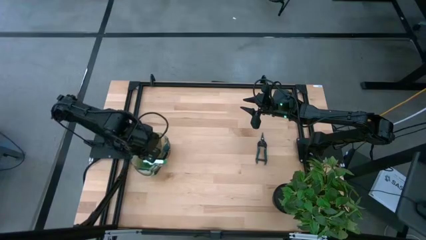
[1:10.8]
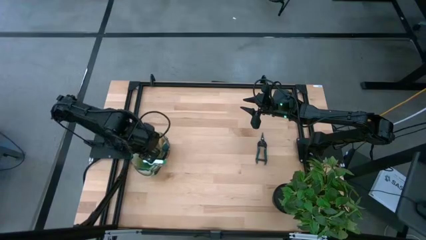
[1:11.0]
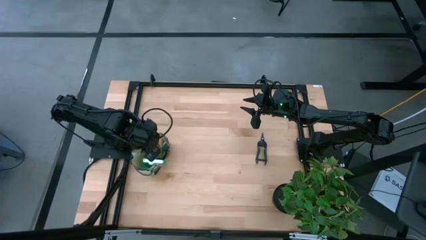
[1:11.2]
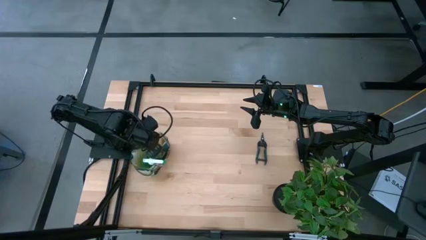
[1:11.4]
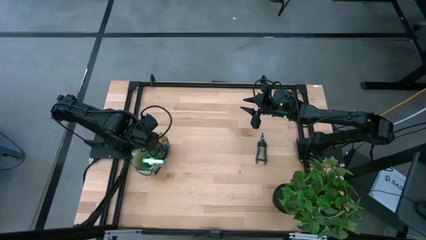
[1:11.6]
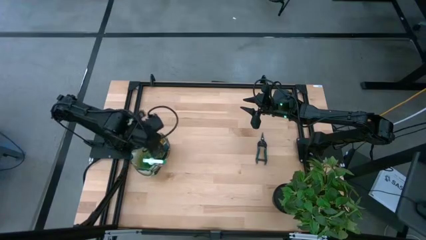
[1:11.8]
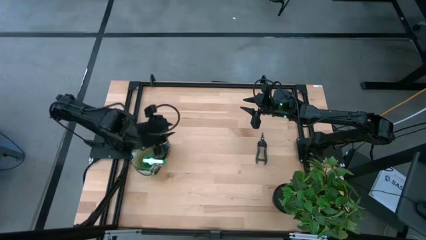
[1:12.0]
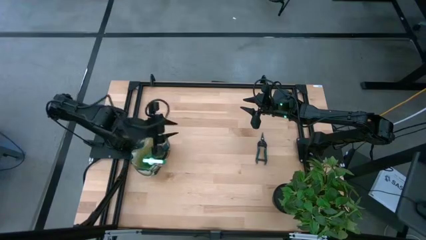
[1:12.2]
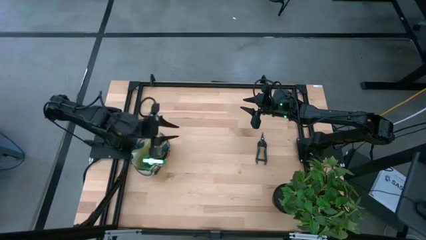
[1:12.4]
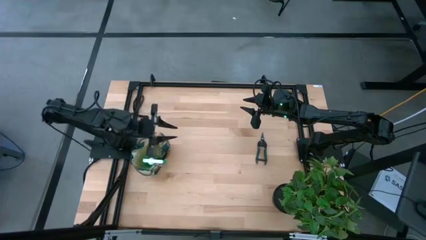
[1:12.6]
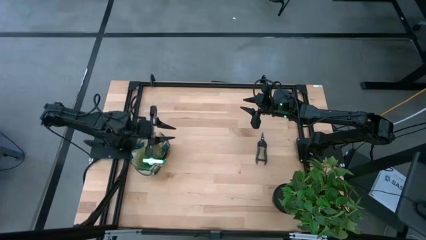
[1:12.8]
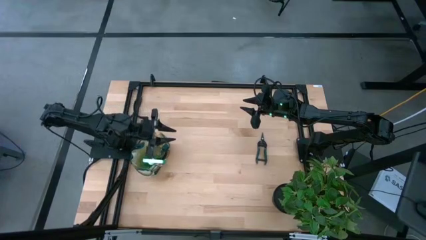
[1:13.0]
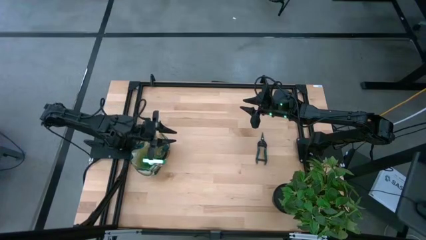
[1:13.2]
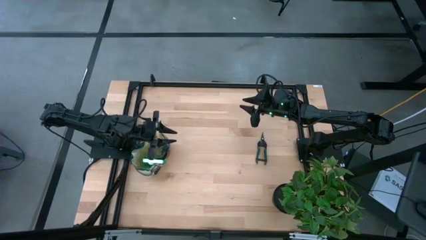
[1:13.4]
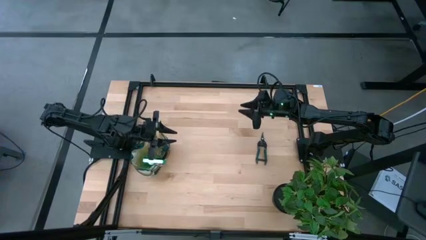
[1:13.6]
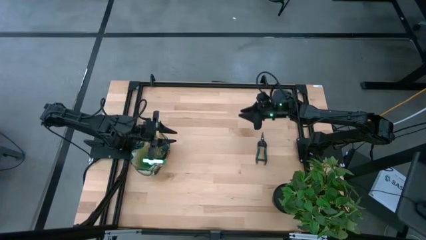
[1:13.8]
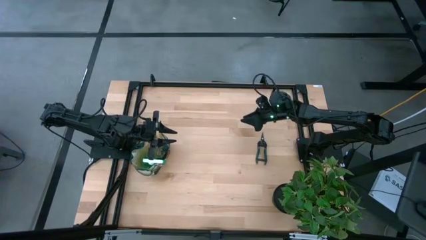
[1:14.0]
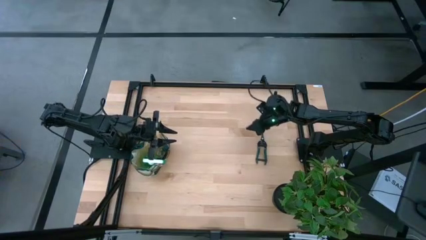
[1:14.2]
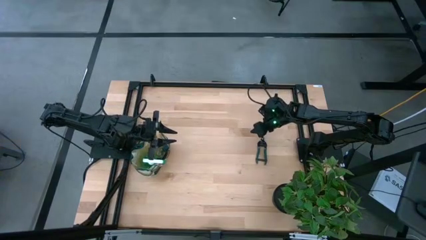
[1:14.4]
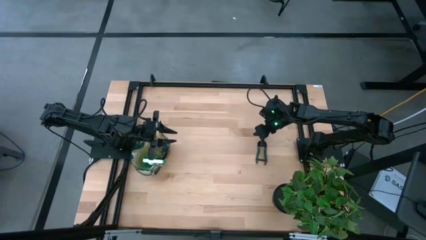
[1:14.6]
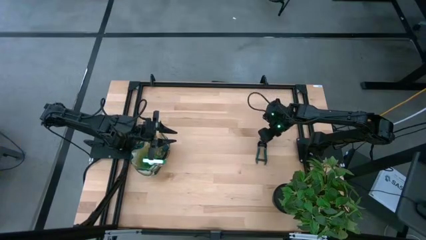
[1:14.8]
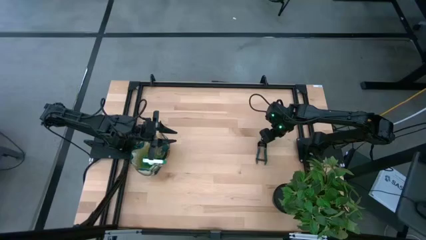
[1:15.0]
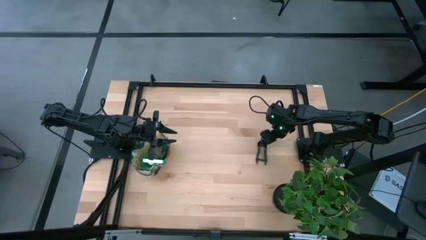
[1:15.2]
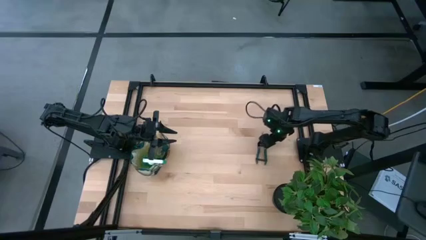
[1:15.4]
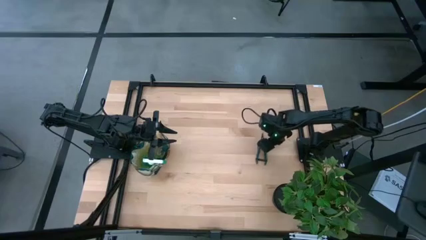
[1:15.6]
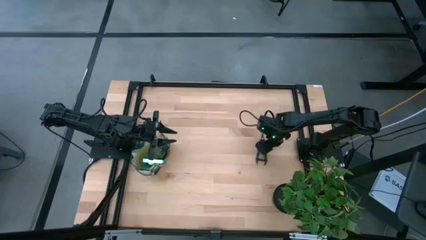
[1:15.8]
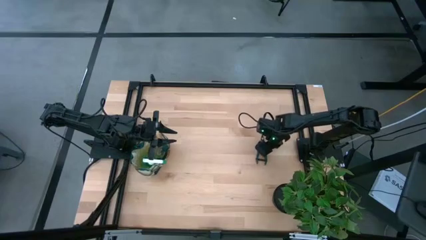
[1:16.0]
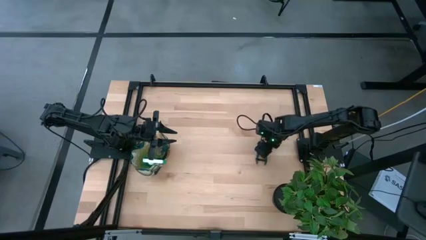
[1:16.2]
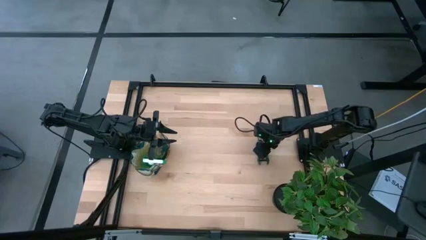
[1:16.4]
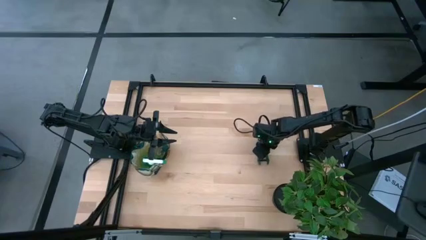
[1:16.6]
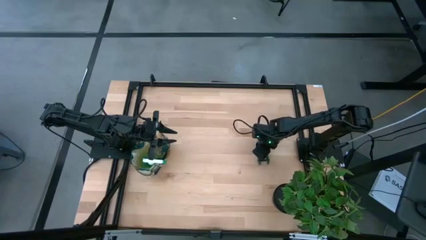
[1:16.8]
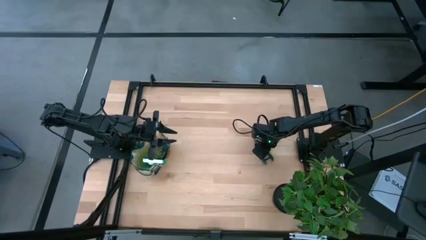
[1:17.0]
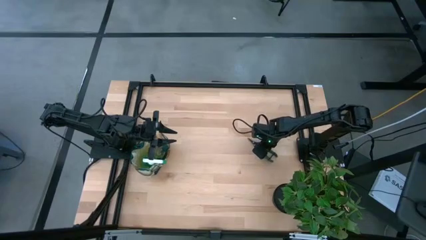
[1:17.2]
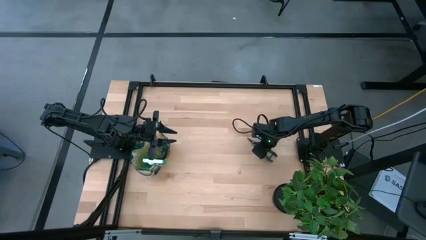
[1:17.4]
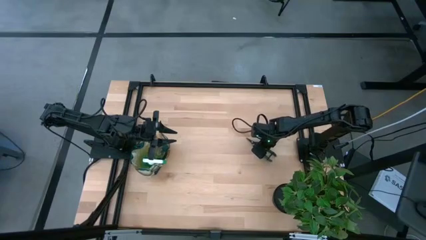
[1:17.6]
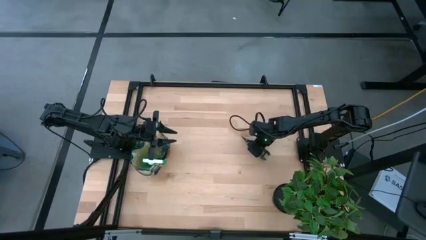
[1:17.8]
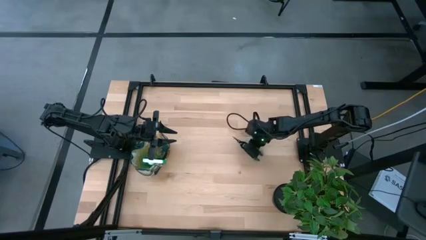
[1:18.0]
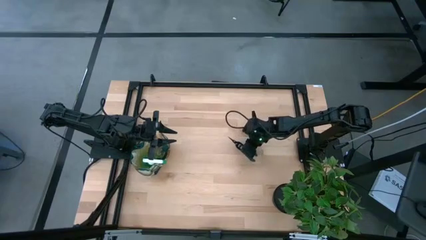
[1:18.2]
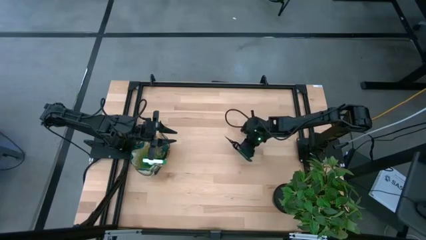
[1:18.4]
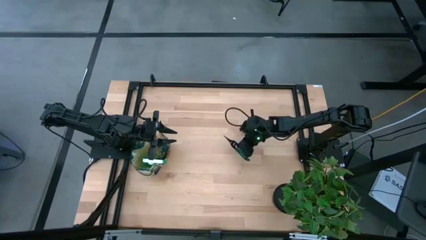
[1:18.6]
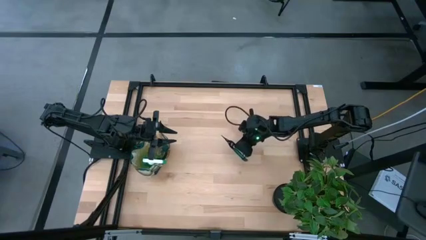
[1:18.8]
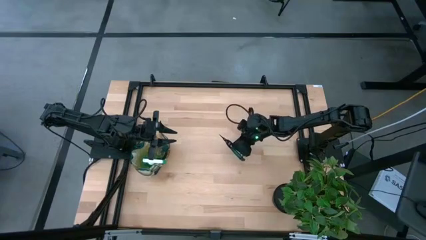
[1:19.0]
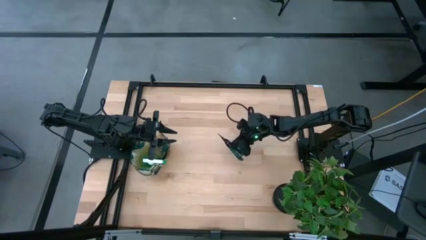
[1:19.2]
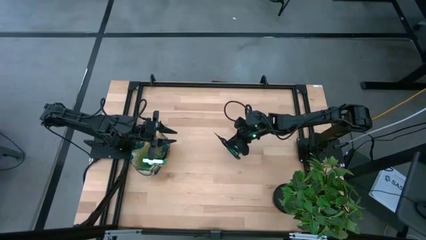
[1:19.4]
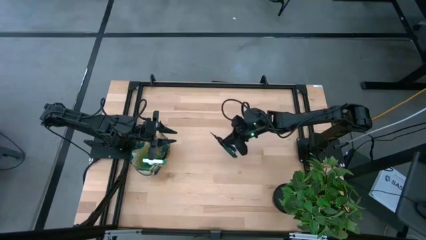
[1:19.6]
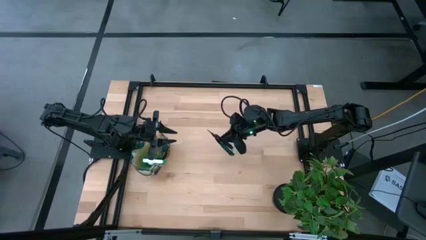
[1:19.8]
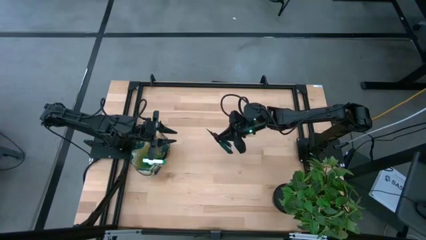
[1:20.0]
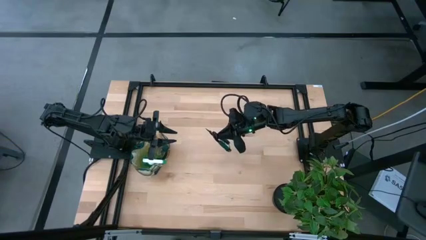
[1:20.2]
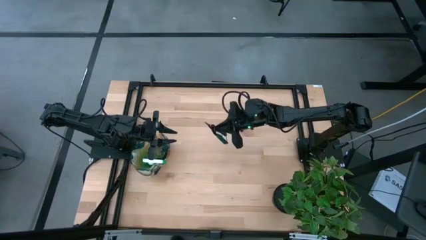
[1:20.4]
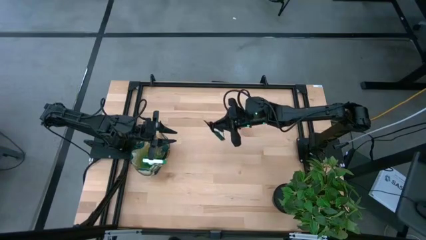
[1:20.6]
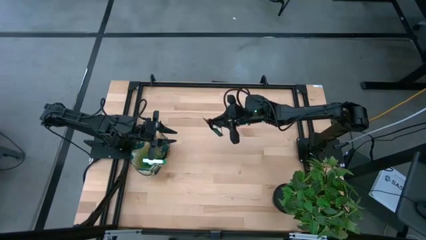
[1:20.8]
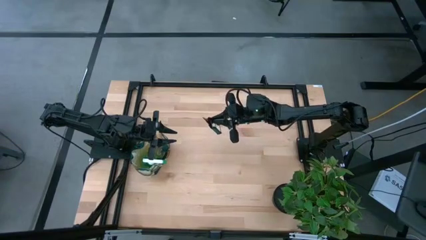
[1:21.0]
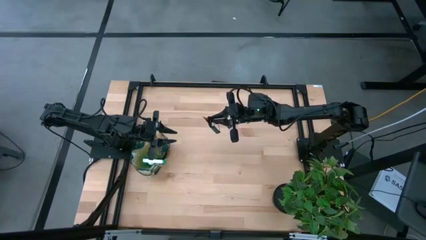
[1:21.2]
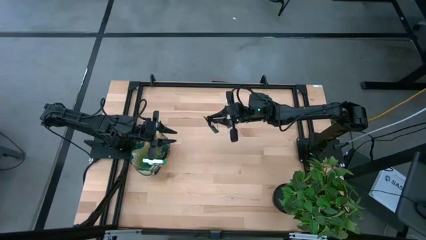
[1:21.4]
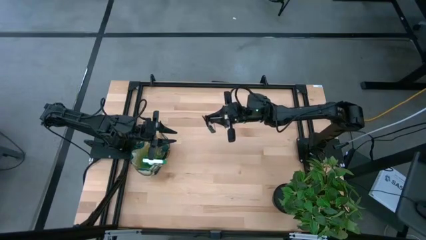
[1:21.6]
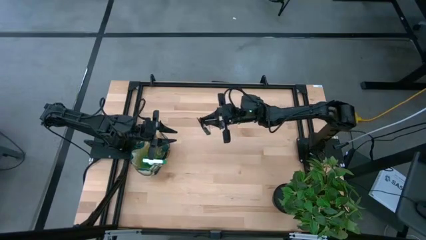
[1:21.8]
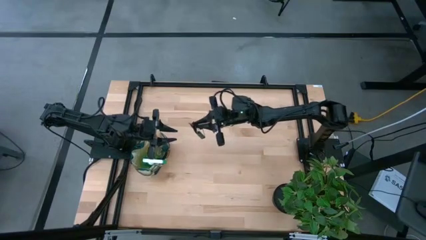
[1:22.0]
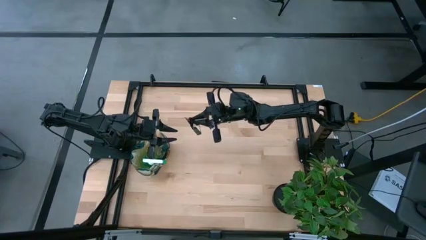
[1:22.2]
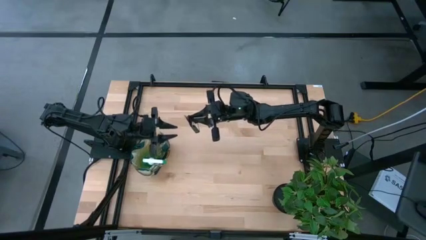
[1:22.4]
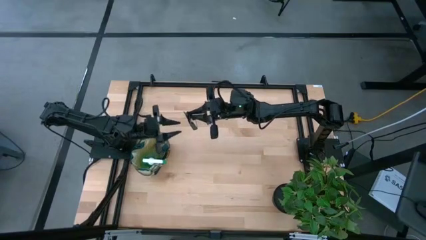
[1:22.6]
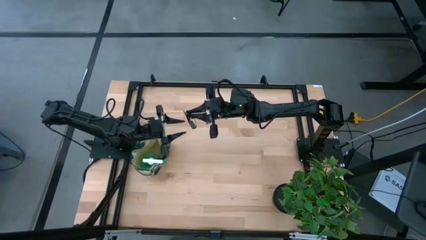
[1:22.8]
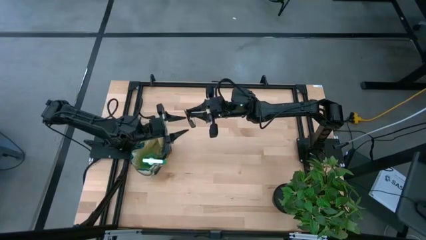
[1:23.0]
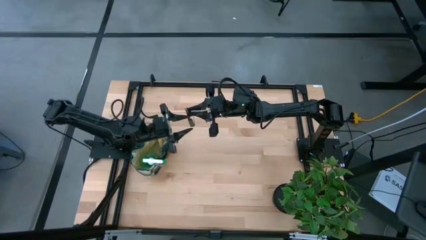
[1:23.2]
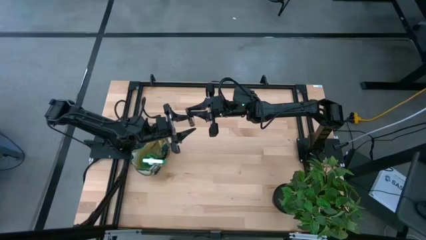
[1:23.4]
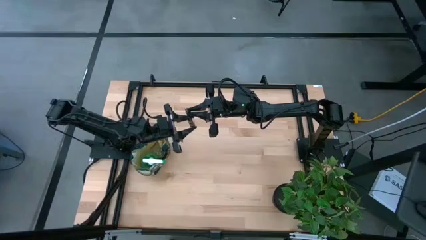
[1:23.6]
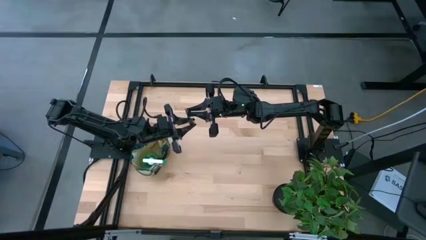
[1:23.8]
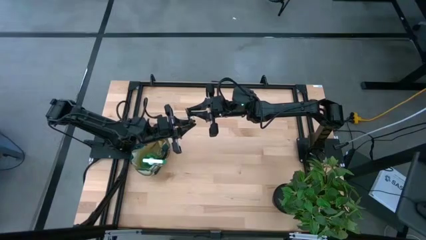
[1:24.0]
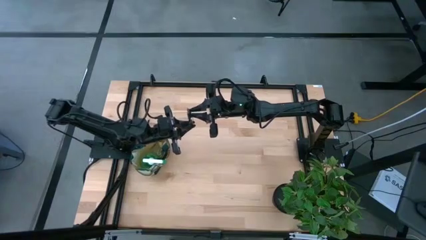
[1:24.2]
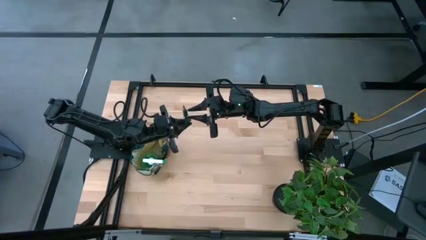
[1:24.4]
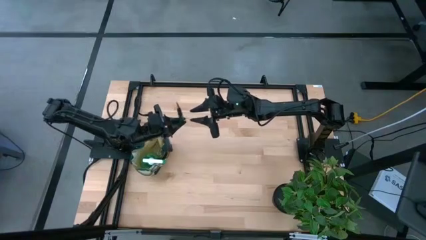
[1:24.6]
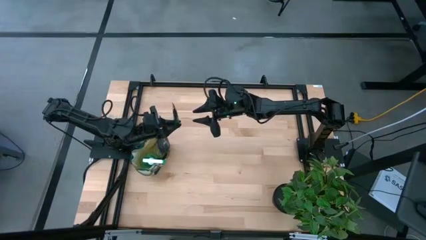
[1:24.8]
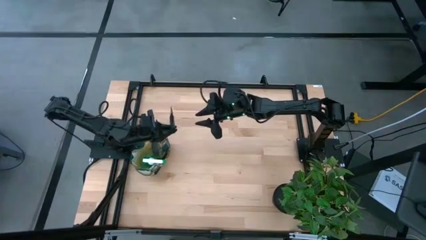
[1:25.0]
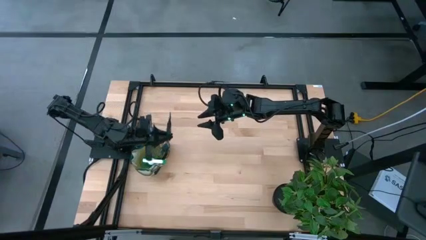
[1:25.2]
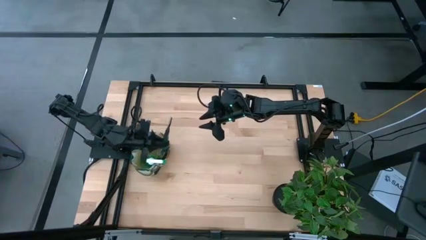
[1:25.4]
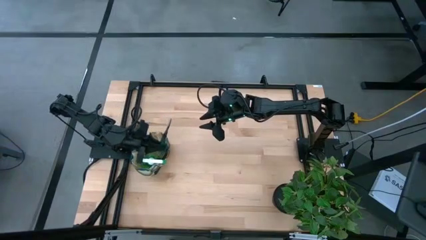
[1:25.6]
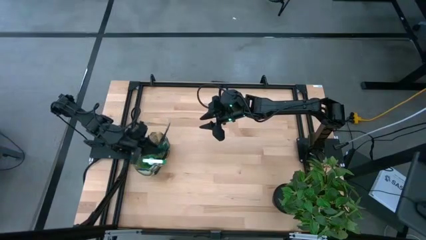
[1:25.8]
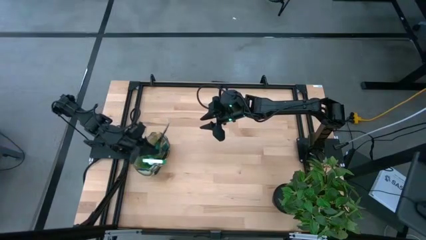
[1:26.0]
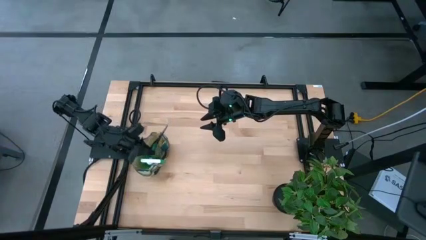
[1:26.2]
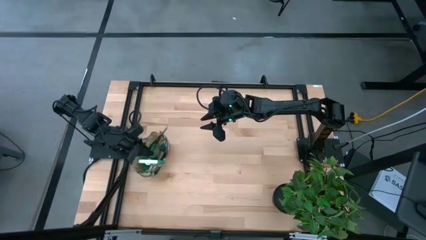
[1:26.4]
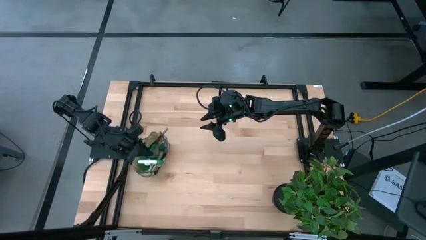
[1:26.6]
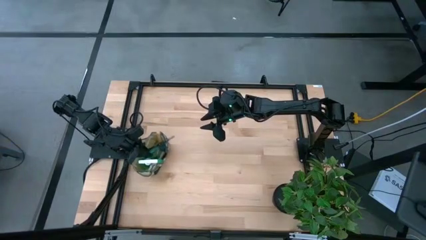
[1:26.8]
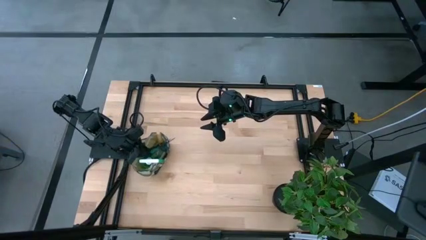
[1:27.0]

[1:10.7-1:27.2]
Task: Pick & Place Garden tools in Gardening bag
Put the green shear scissors into the gardening bag
